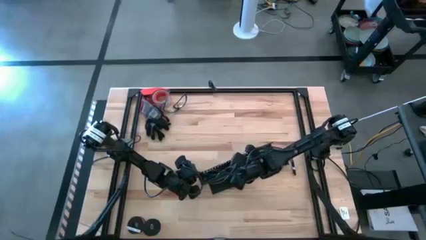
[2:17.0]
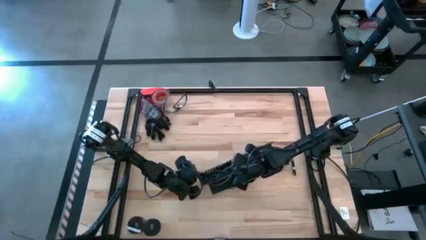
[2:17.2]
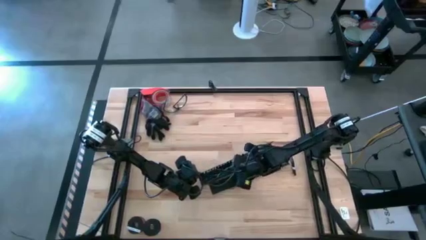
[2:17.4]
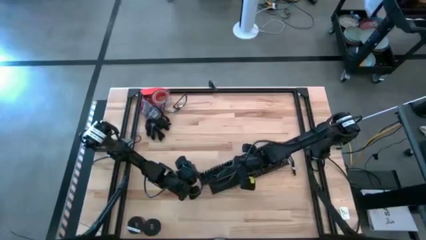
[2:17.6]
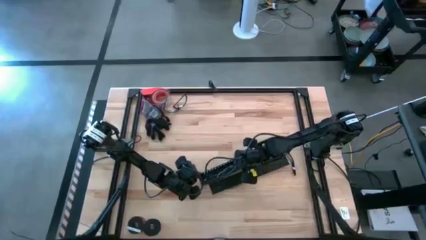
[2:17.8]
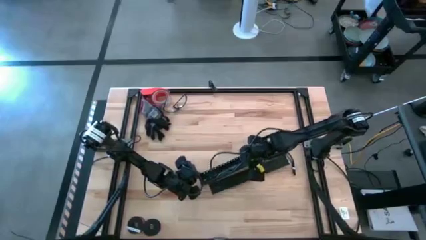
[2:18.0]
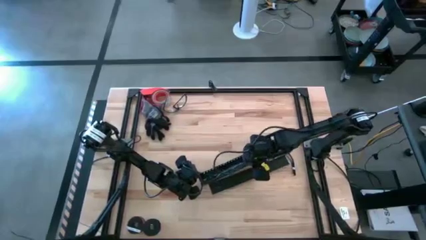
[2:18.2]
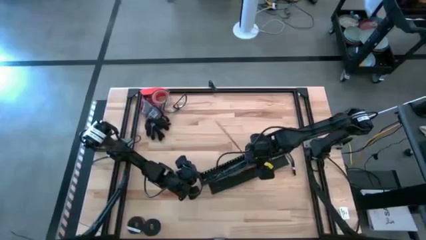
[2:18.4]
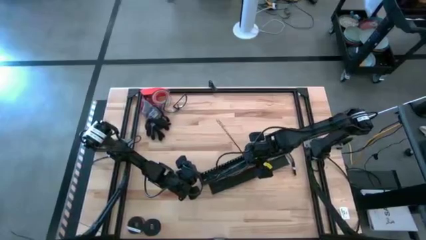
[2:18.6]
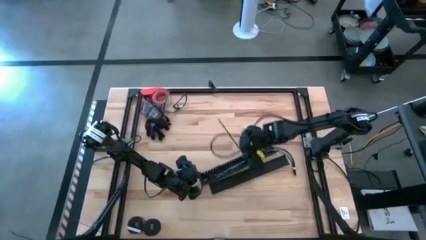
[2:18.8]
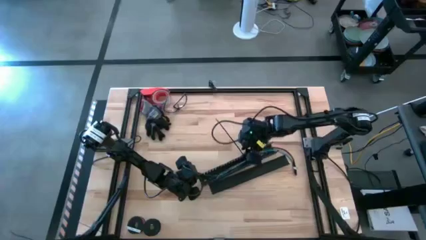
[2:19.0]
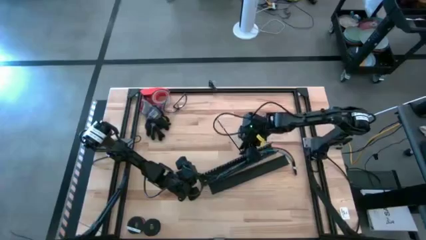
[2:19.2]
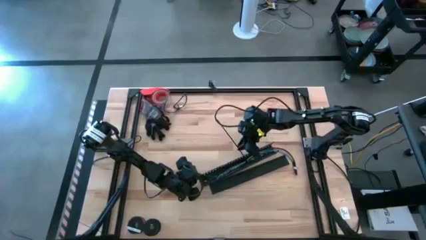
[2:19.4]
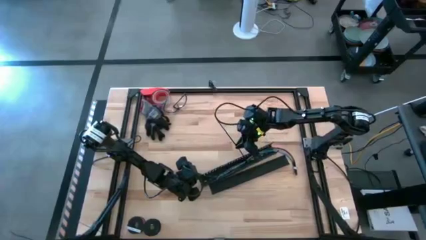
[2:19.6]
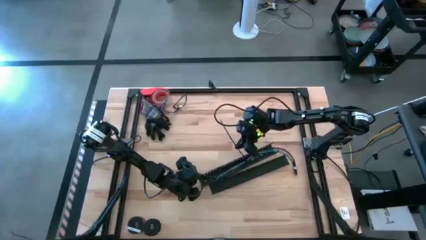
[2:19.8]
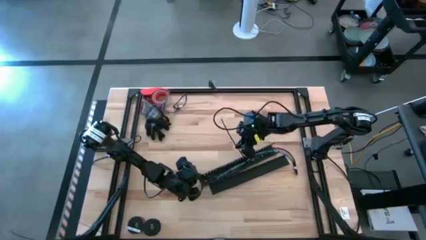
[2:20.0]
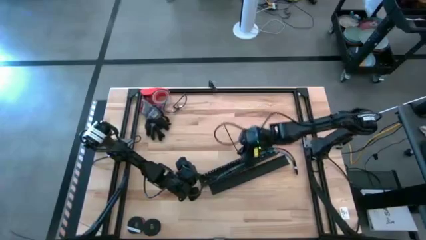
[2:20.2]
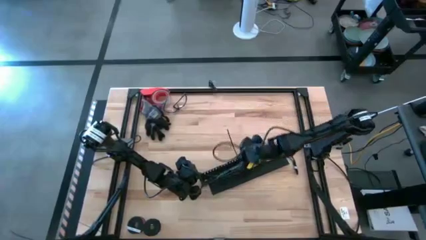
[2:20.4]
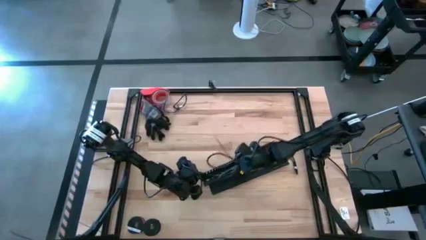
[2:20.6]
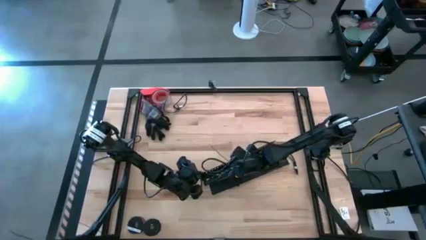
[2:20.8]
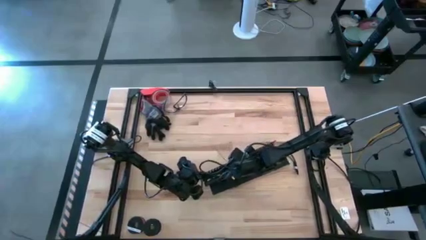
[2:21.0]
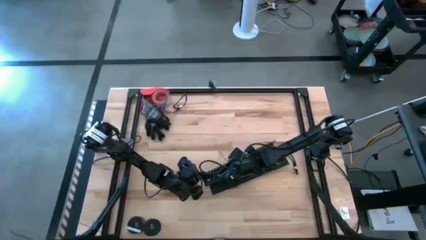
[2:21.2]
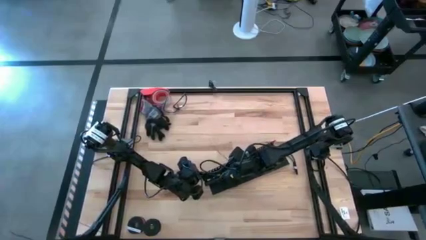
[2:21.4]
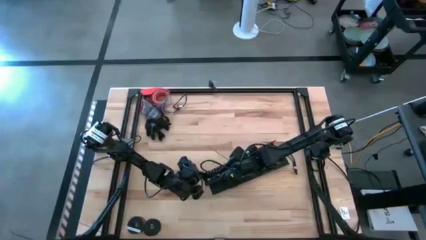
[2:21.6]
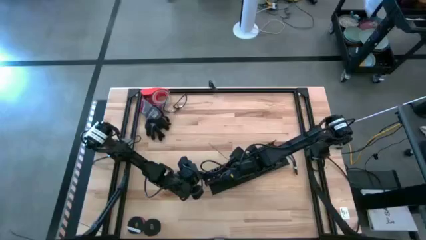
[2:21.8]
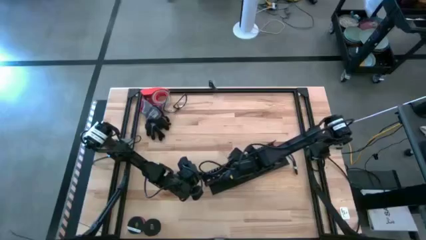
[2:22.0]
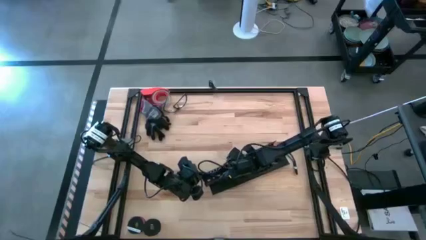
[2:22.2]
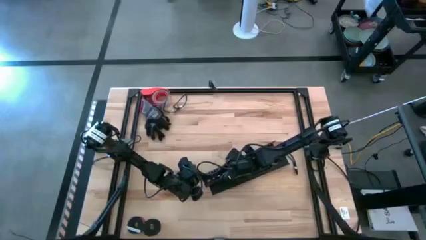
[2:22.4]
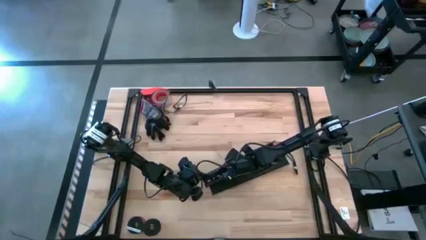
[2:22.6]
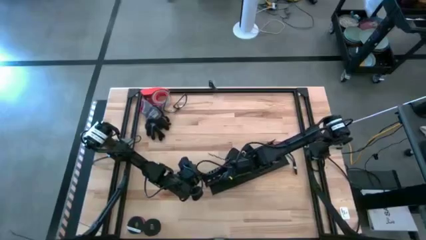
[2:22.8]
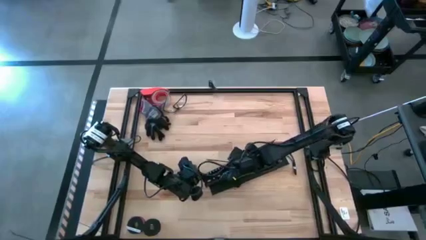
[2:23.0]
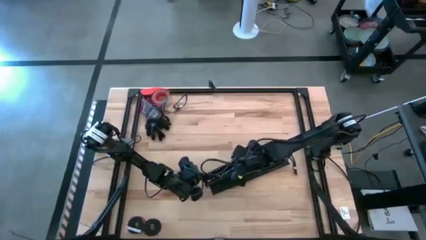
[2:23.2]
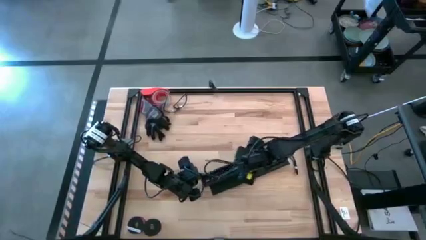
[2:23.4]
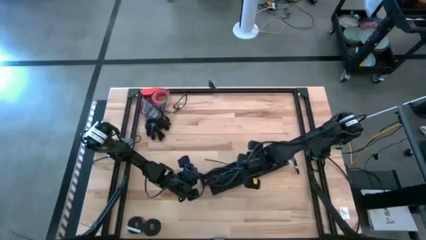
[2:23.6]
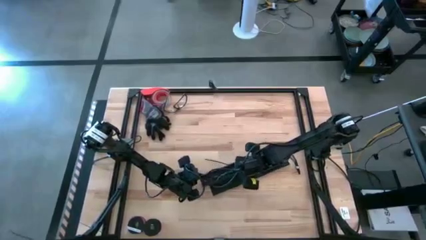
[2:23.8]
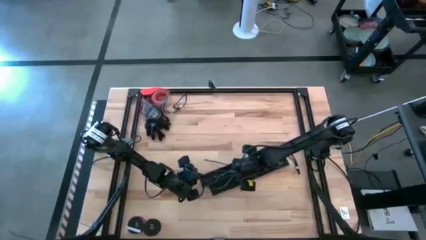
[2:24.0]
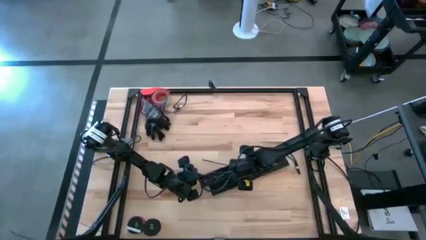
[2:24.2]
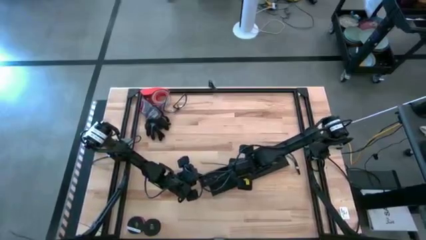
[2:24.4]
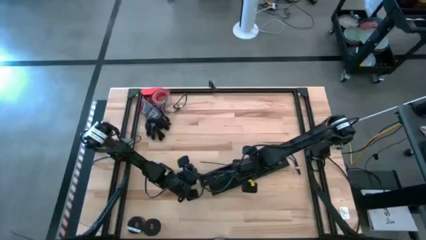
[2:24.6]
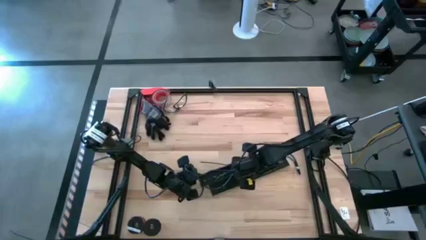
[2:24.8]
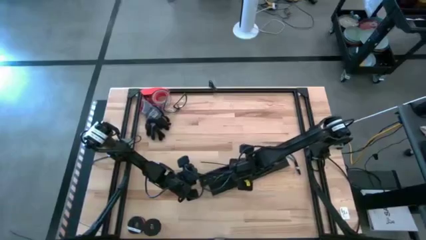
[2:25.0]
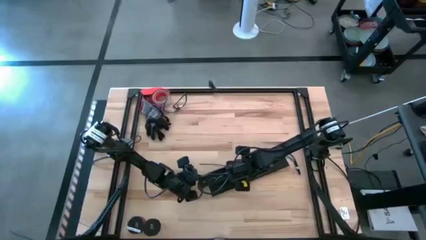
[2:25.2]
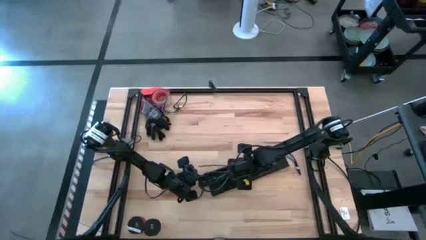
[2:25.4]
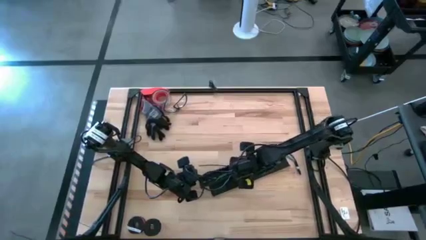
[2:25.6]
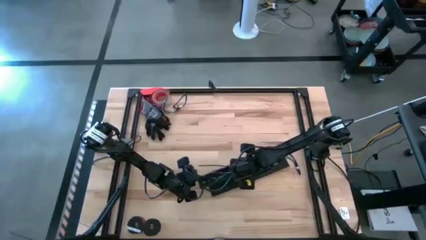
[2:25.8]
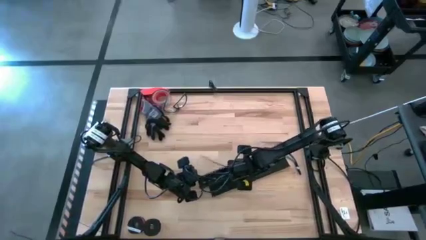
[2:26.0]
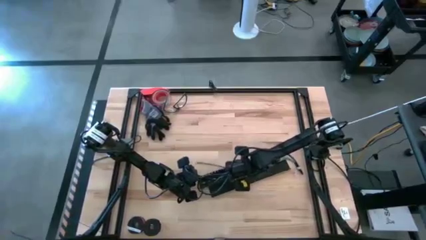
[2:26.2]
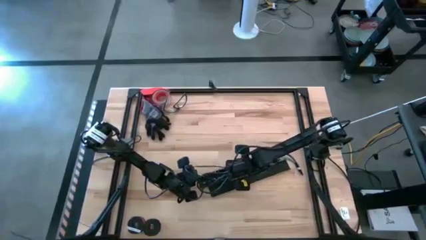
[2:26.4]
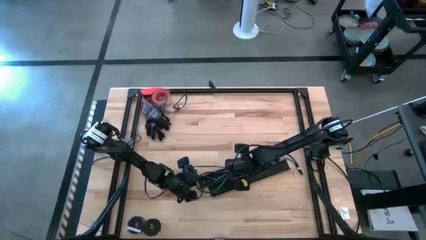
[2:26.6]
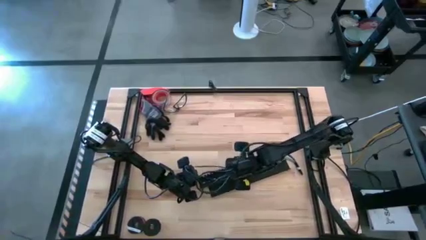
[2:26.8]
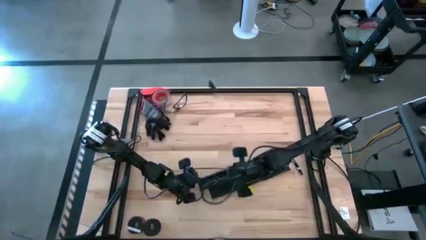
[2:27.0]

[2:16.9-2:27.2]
Task: Ziptie cables
Put the ziptied cable wires into the black cable duct

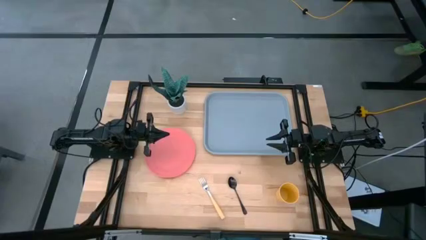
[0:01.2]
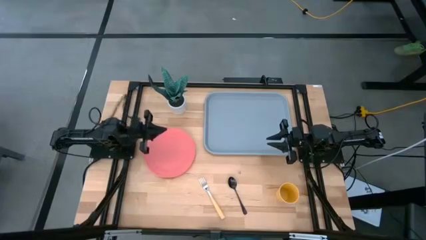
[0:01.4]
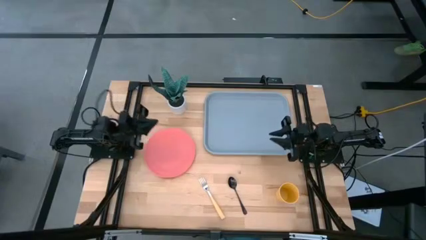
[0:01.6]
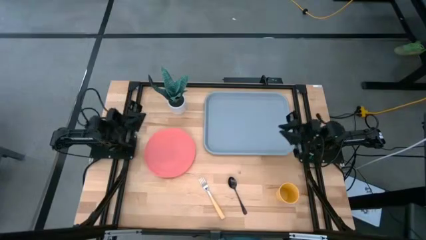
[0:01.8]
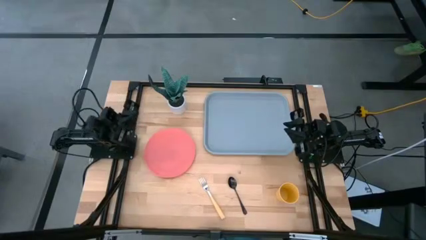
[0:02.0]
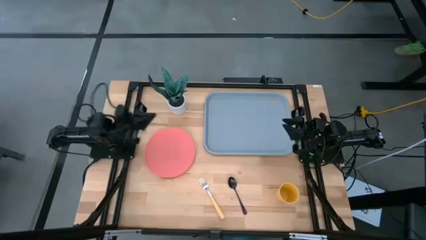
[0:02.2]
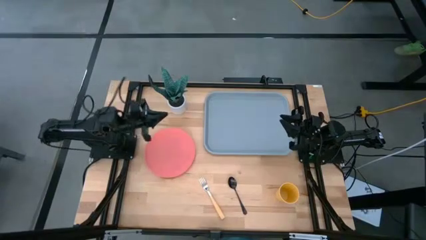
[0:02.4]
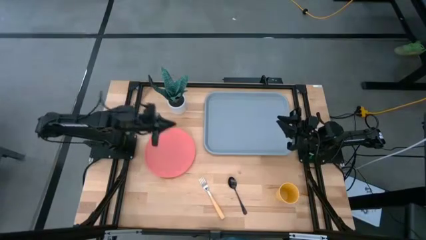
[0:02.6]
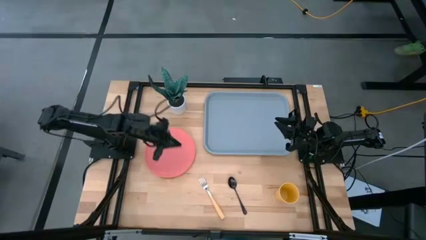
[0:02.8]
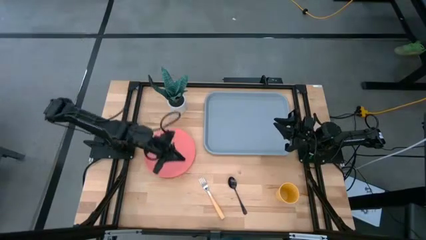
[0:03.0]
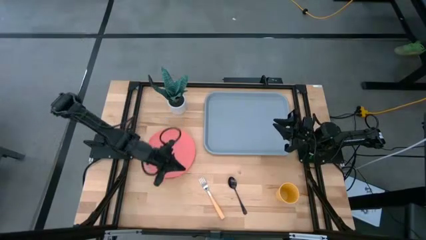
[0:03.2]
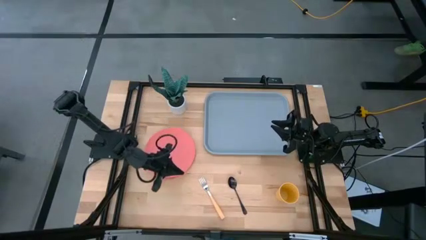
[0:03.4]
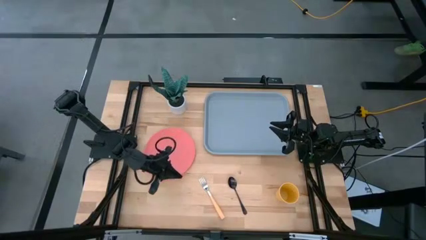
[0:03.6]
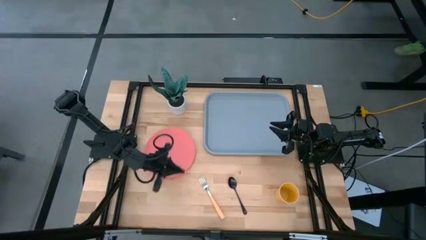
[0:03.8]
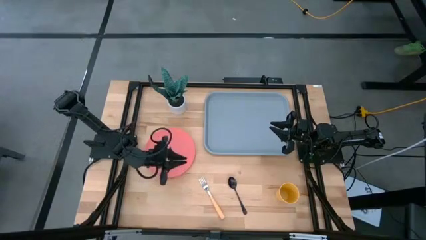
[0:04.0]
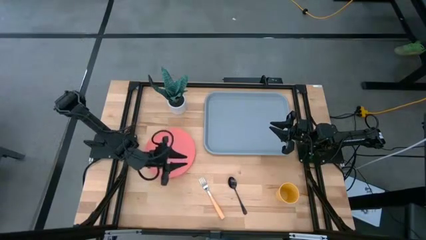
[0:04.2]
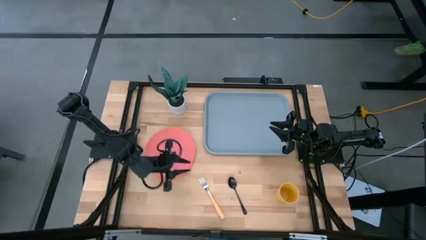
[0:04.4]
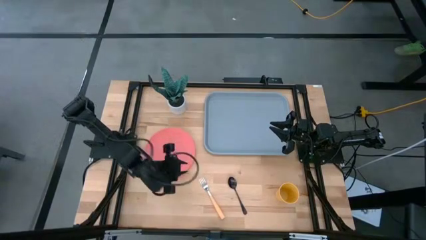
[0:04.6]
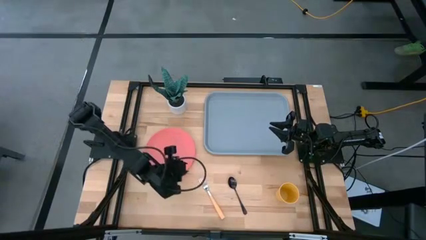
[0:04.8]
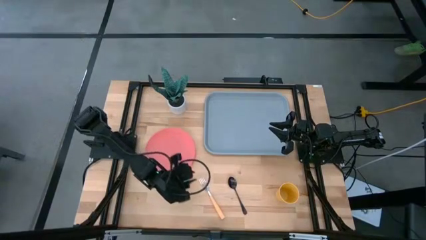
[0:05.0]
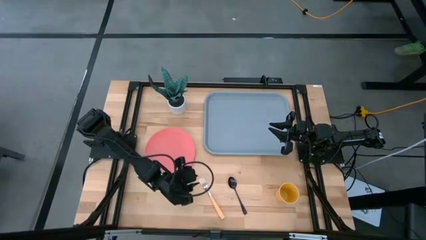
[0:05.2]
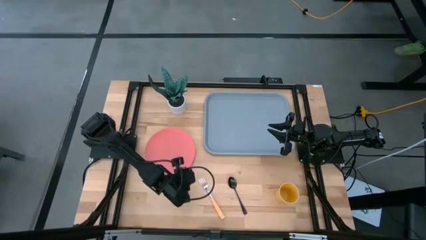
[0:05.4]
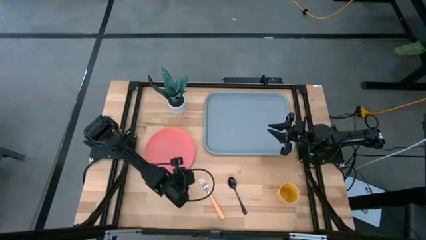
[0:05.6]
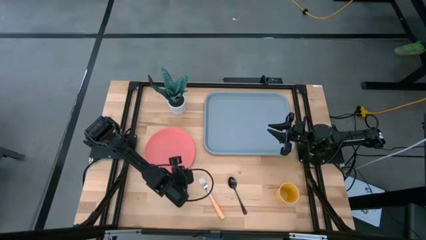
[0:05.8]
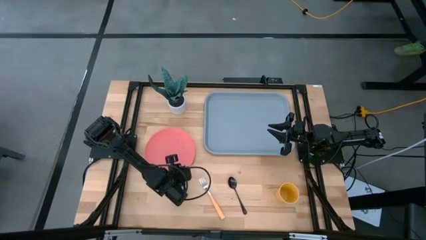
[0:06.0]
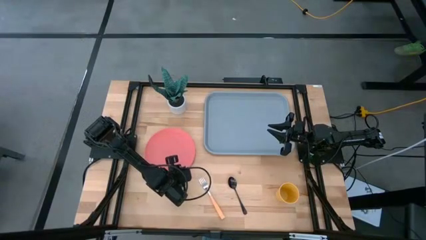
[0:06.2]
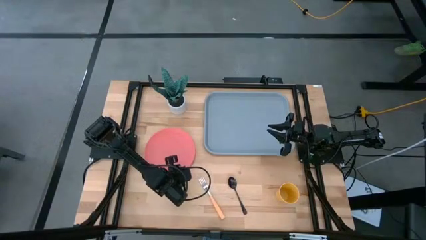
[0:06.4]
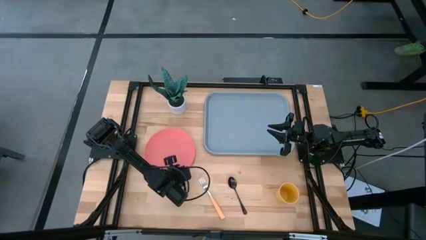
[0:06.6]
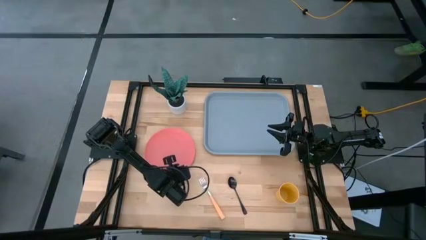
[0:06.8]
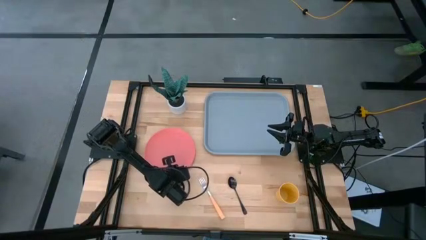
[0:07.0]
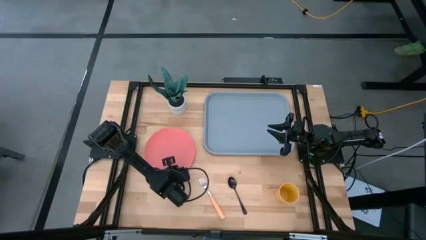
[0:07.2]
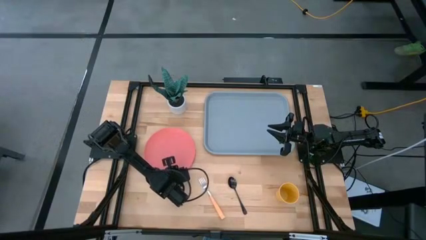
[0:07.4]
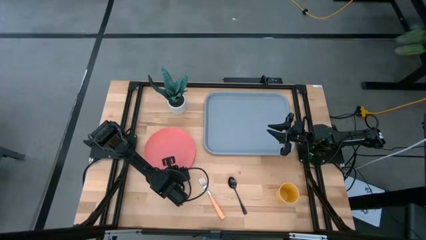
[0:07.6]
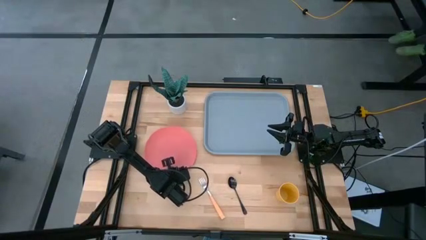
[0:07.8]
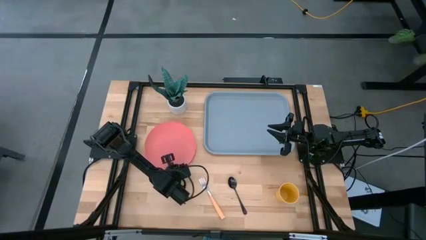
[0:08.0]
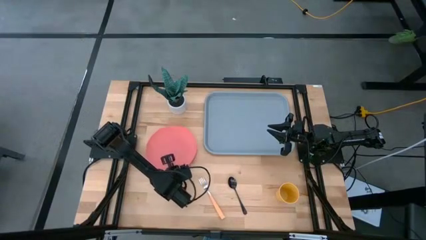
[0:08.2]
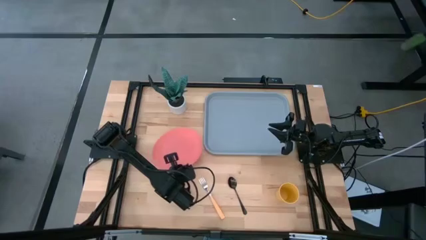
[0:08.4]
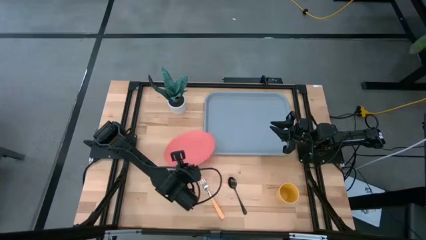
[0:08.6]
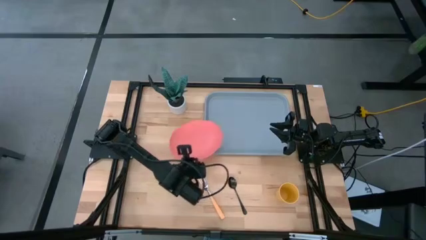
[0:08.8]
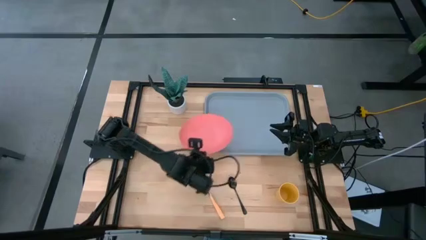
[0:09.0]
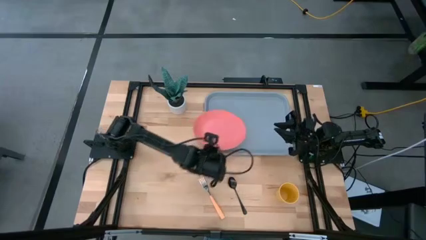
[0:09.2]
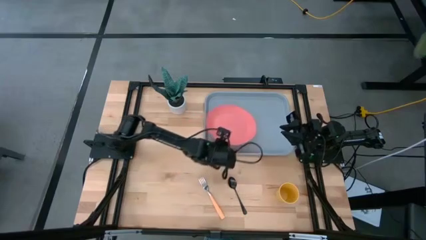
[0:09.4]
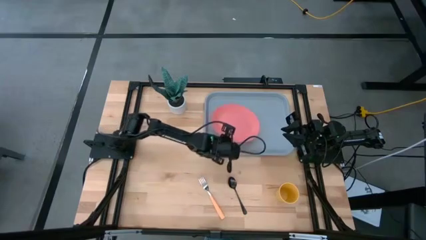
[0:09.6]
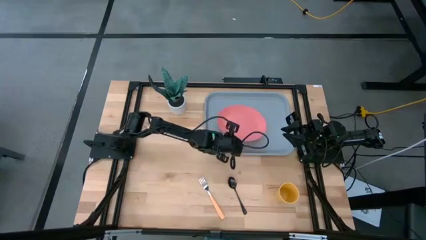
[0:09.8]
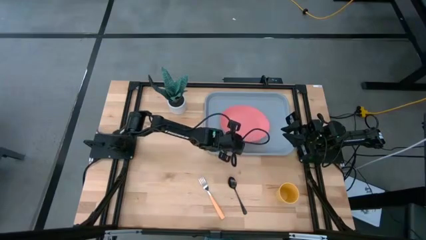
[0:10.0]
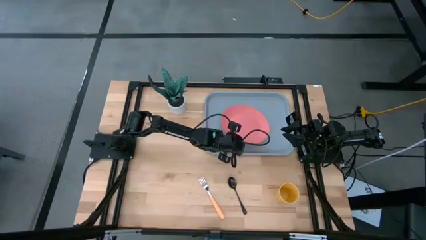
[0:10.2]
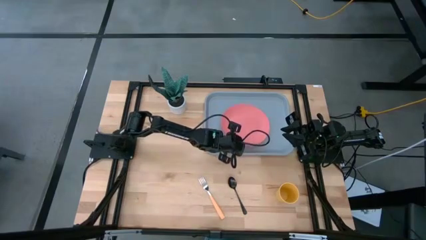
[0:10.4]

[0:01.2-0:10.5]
Task: Pick and place plate/cup/fork/spoon on tray
Put the pink plate on the blue serving tray
